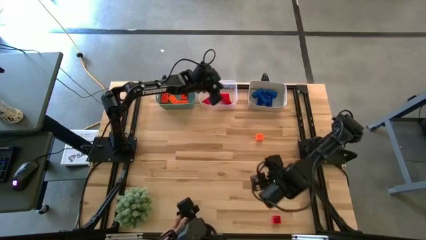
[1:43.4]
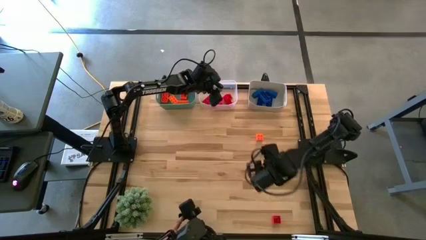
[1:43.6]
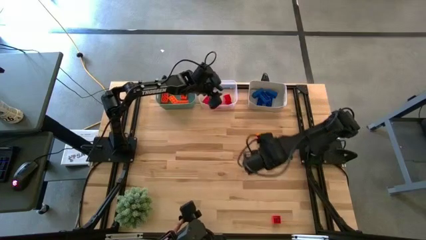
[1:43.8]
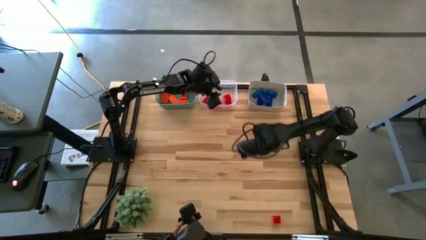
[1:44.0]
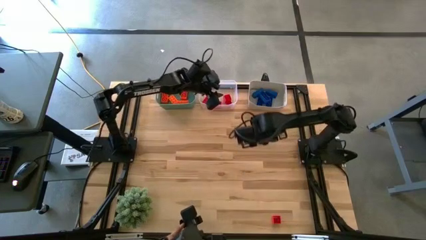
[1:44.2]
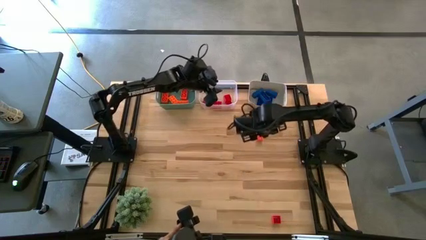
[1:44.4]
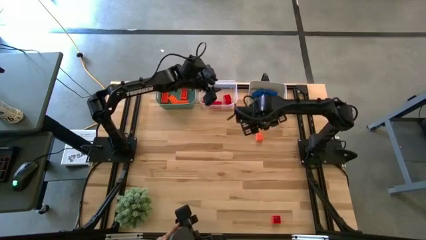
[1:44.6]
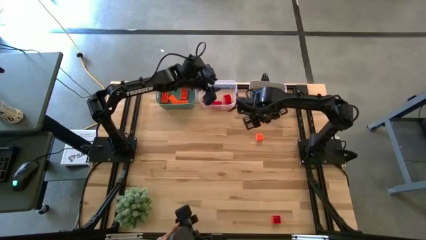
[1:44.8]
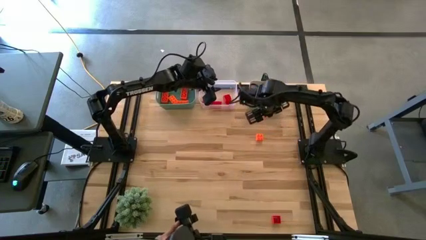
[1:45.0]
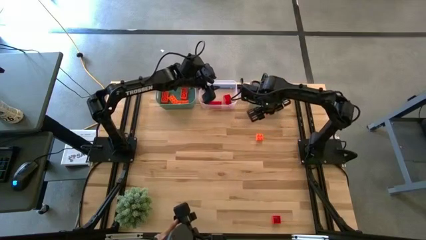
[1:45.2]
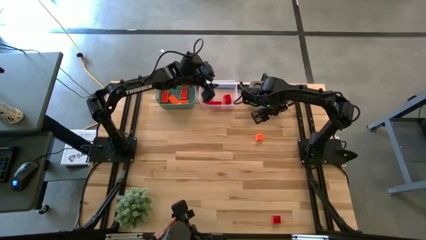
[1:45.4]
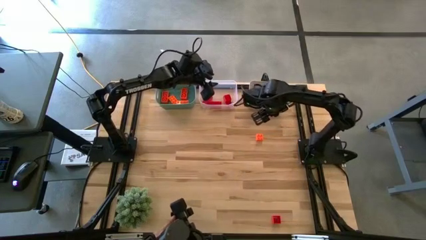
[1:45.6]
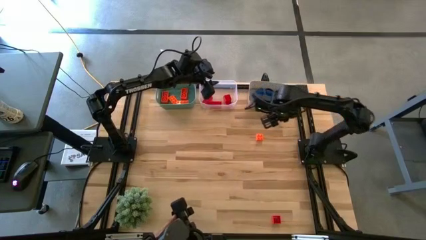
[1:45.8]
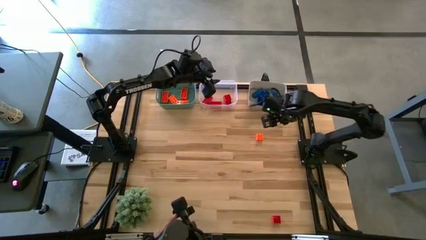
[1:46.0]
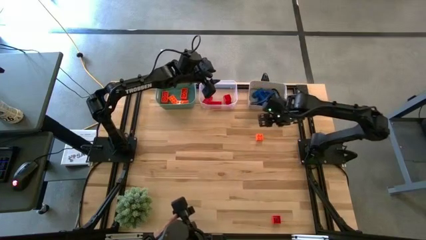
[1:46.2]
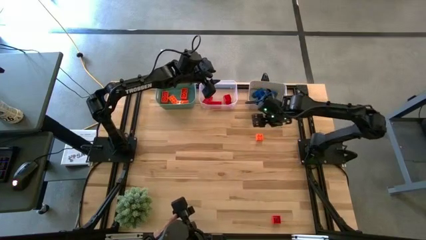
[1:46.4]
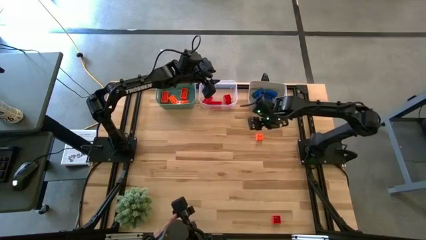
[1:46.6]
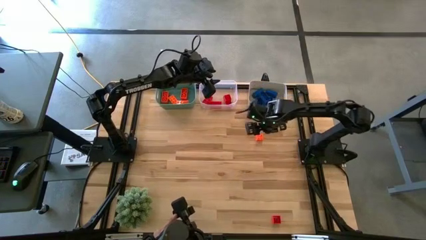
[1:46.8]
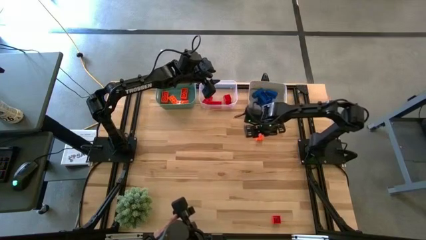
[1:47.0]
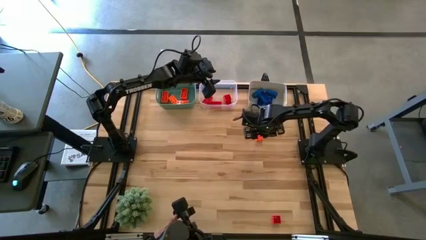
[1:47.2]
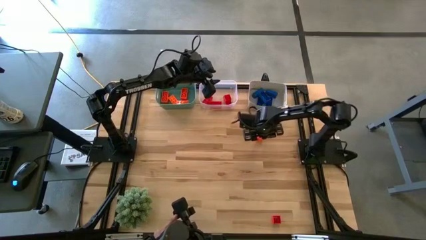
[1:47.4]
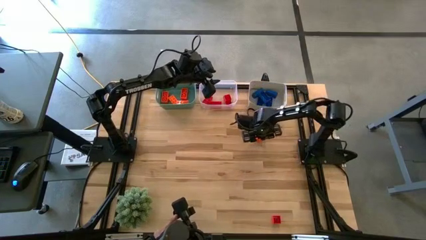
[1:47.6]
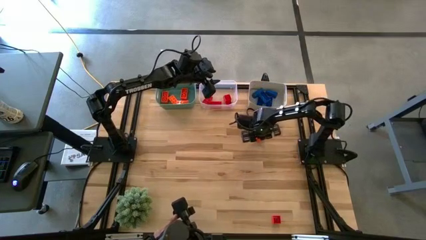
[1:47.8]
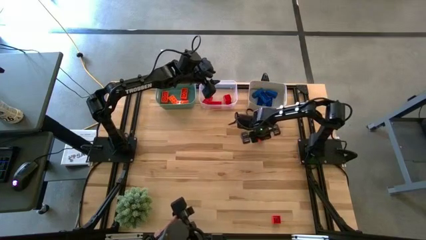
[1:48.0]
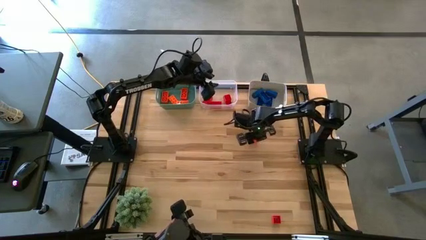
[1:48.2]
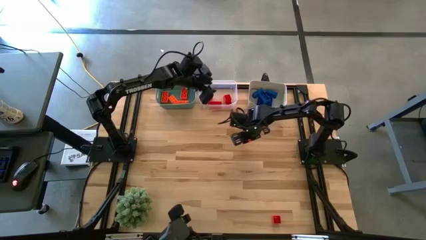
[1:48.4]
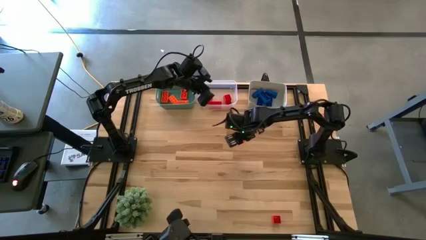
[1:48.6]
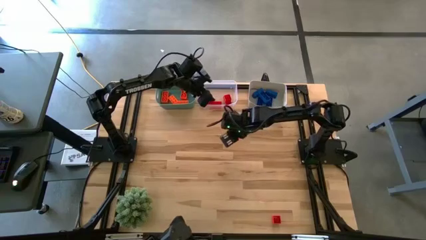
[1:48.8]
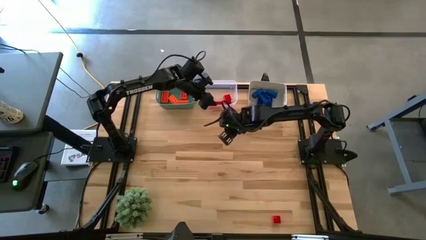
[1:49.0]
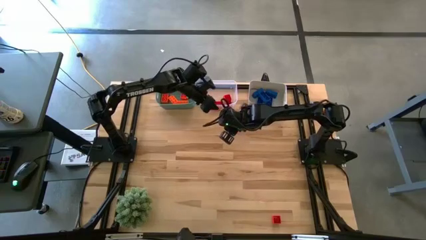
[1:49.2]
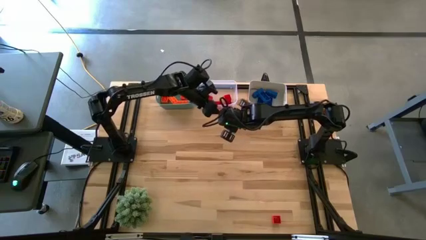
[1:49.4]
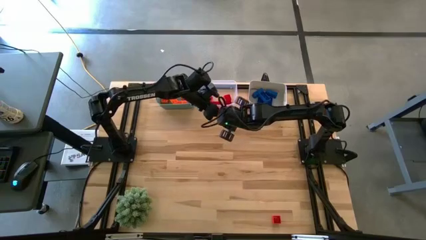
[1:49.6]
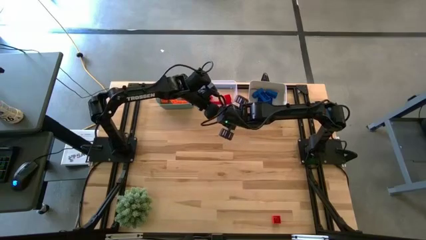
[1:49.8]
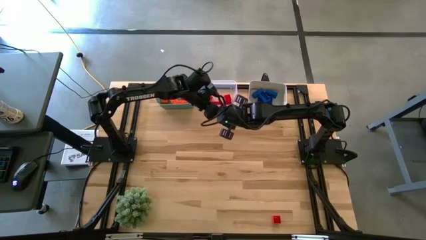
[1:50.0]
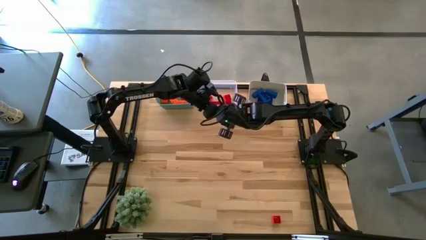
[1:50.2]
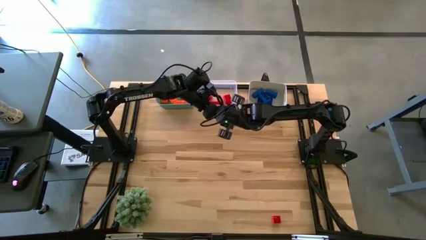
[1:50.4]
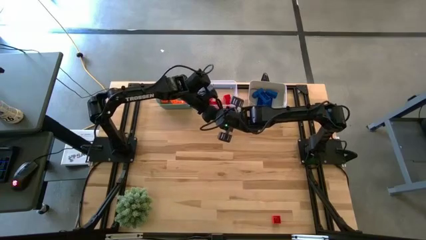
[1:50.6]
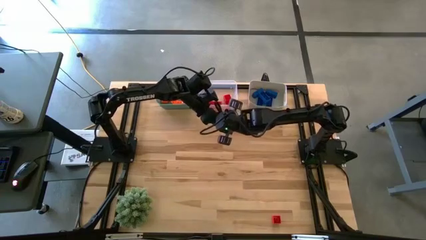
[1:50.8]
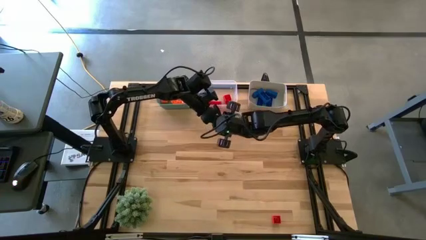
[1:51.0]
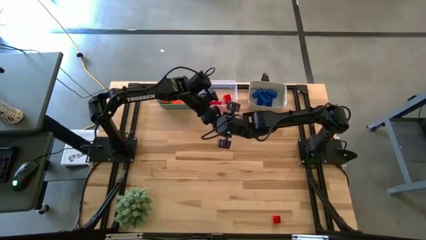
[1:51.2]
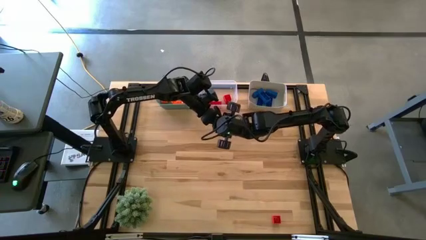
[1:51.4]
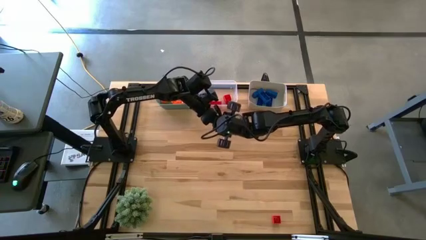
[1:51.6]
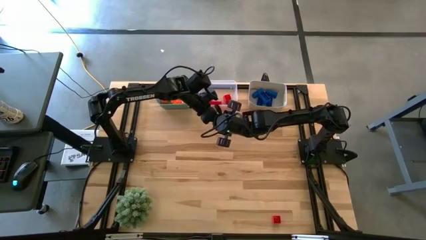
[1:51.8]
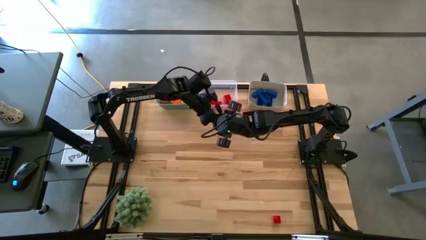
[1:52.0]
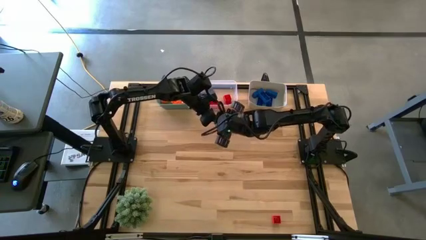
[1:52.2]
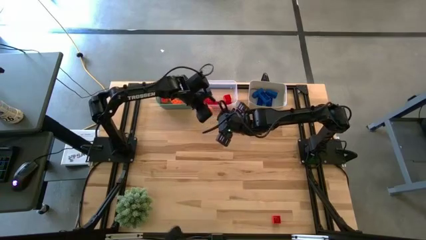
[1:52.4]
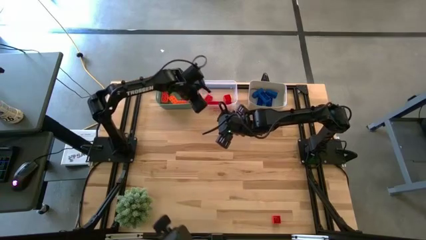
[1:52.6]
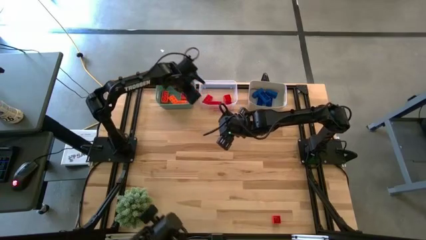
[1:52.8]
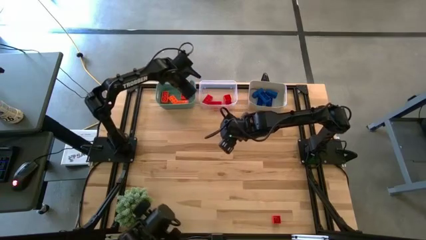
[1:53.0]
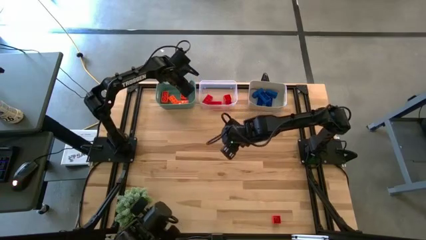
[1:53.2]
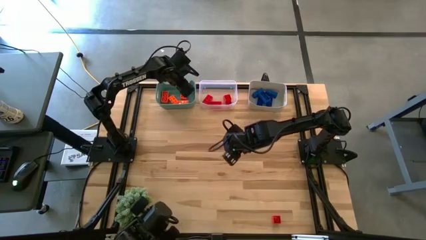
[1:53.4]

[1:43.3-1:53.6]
Task: Sort & place blocks by color
Put the orange game piece into the green bin

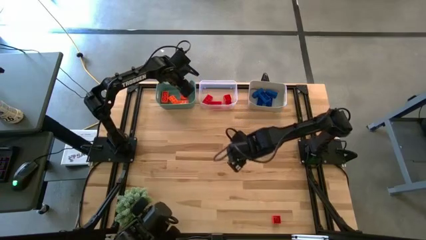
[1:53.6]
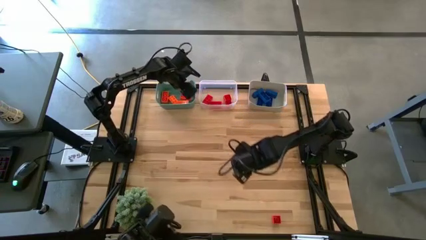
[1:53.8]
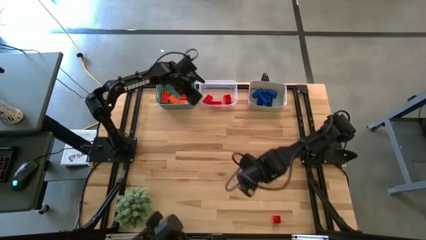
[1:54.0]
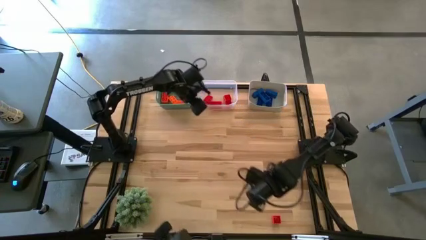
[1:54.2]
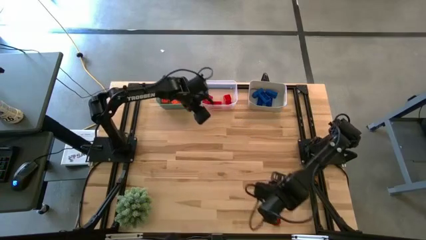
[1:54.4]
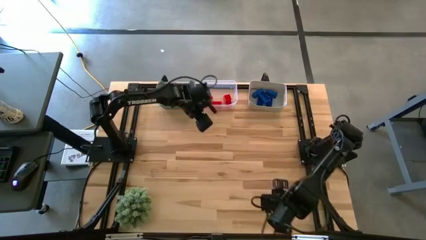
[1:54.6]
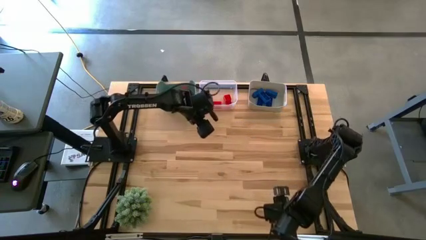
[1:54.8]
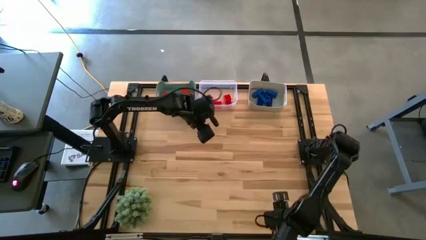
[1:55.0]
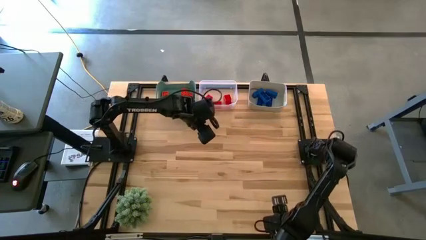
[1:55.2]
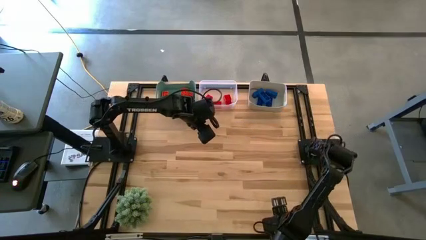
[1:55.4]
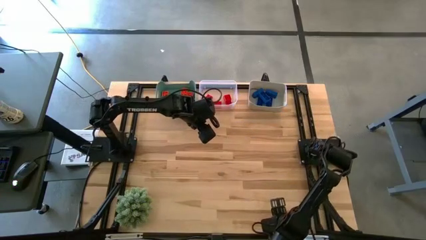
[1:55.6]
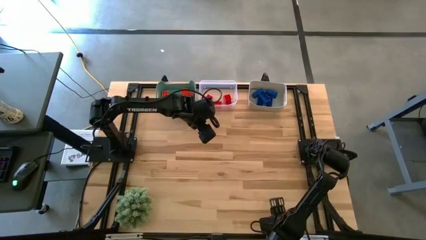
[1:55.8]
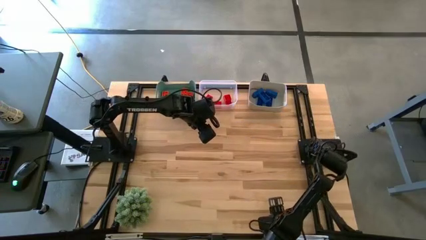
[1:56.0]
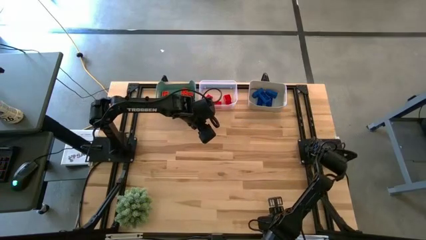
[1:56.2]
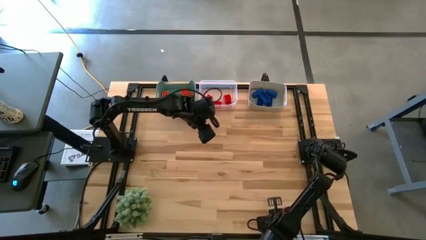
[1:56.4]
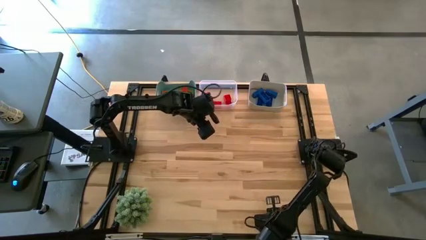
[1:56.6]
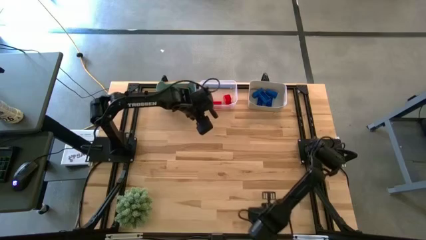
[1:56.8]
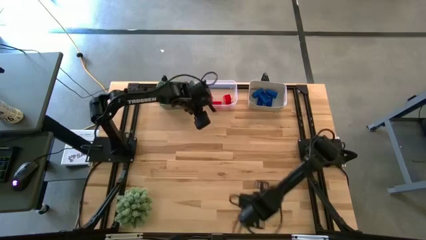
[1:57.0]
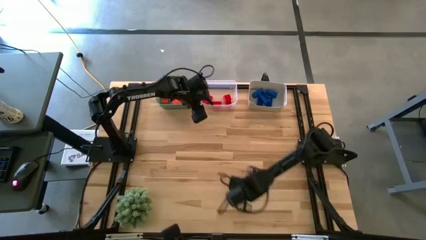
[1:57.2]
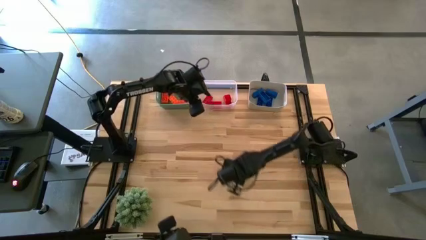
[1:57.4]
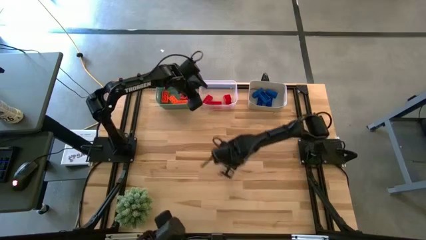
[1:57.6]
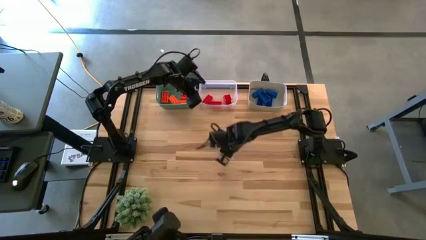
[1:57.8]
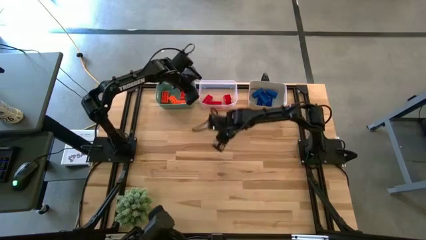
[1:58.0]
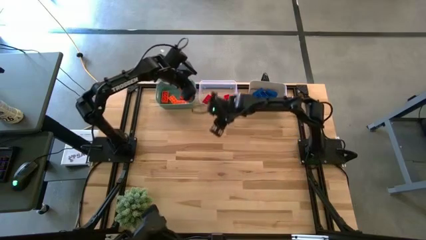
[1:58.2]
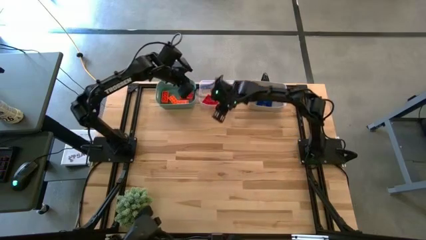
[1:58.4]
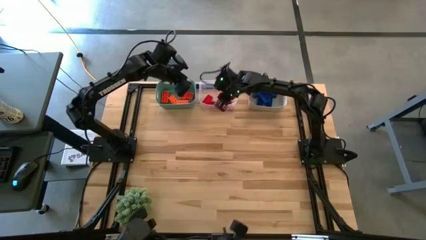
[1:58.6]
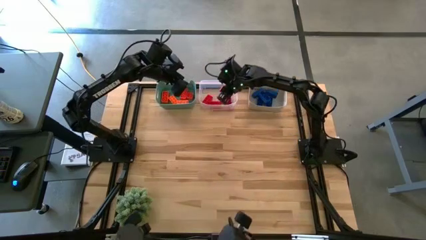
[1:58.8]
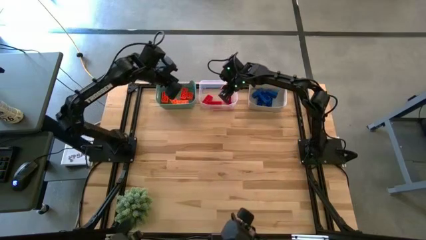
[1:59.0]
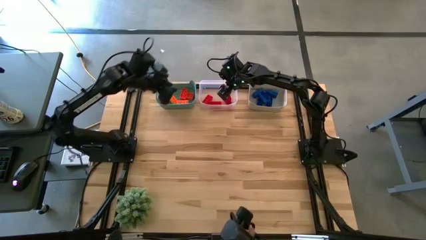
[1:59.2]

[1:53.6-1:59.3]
Put the red game piece into the transparent bin
